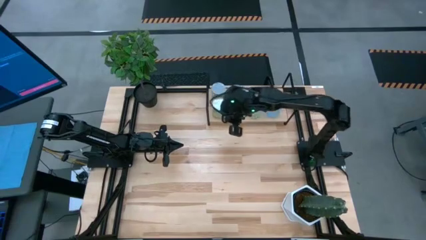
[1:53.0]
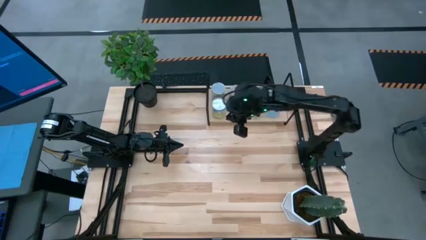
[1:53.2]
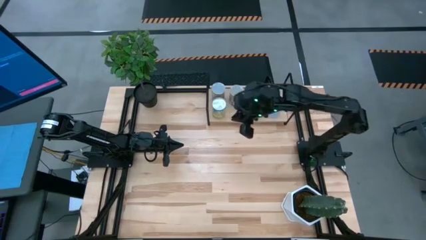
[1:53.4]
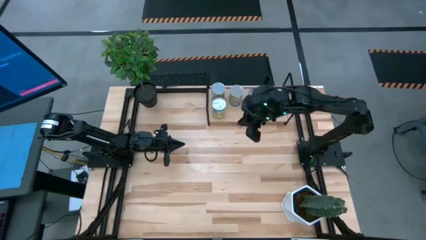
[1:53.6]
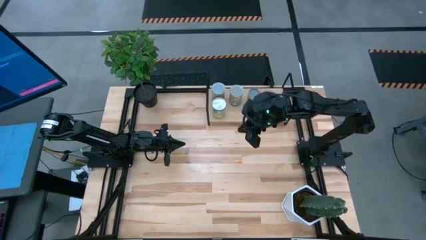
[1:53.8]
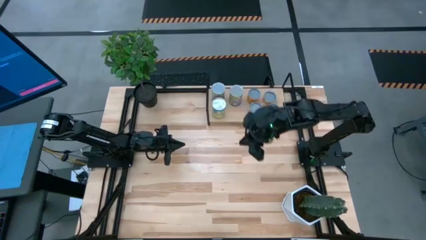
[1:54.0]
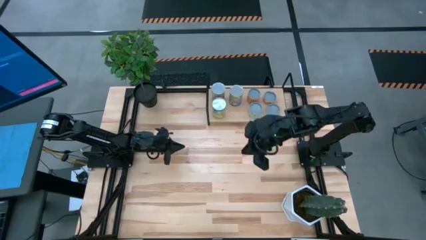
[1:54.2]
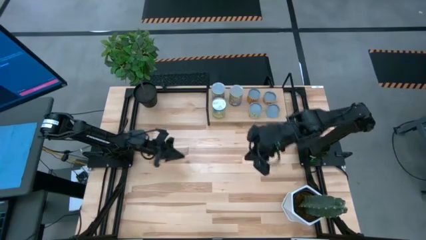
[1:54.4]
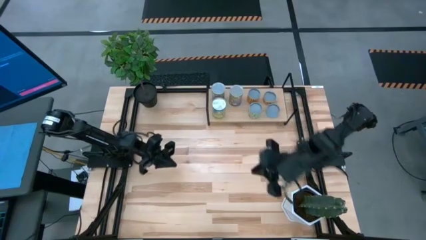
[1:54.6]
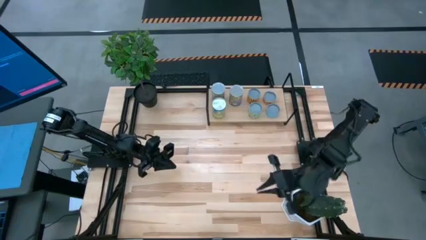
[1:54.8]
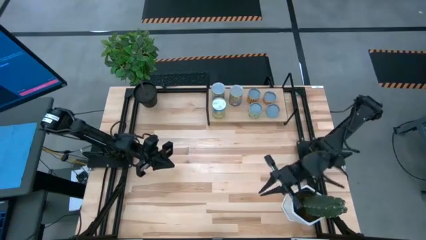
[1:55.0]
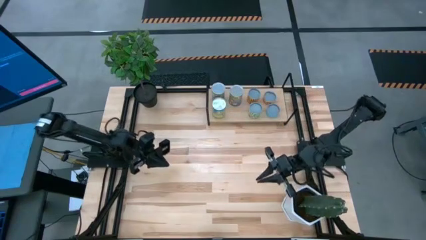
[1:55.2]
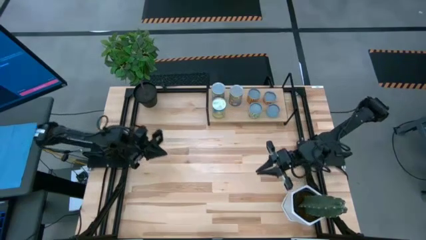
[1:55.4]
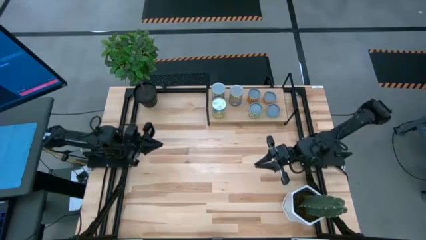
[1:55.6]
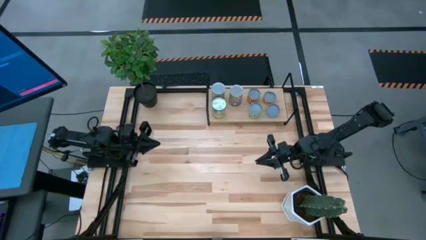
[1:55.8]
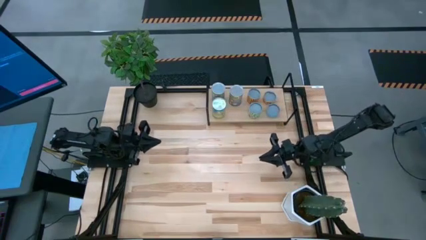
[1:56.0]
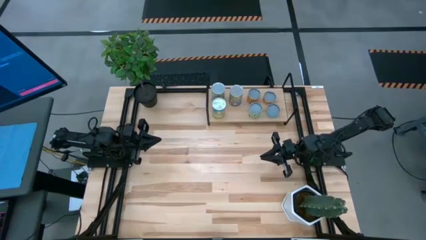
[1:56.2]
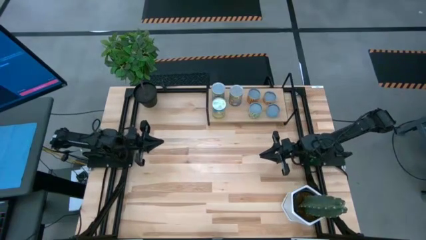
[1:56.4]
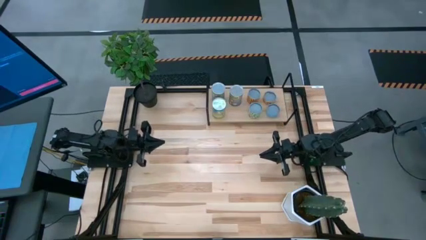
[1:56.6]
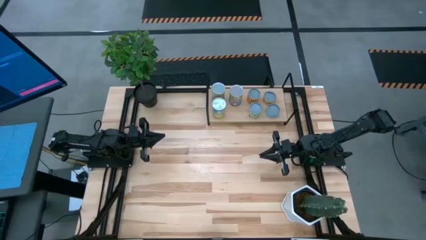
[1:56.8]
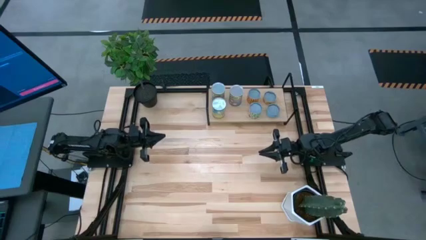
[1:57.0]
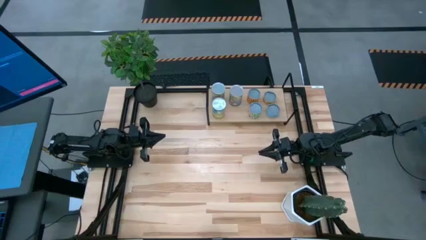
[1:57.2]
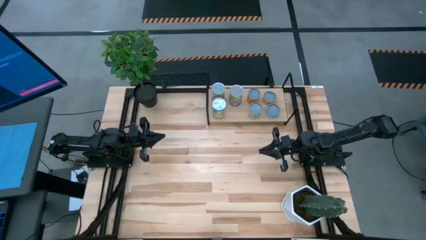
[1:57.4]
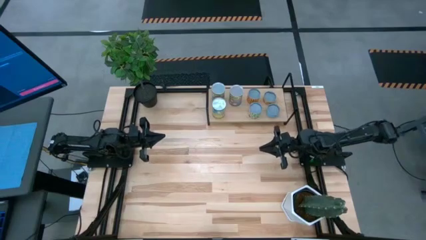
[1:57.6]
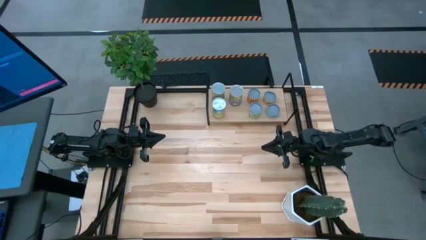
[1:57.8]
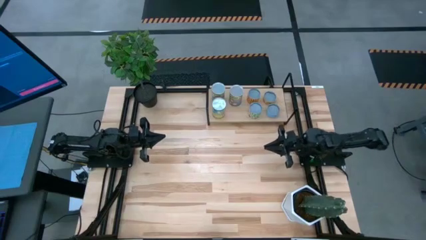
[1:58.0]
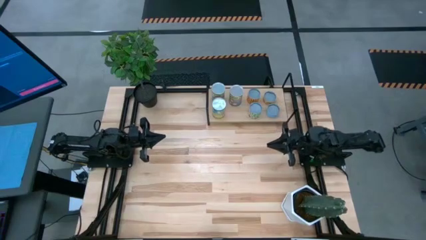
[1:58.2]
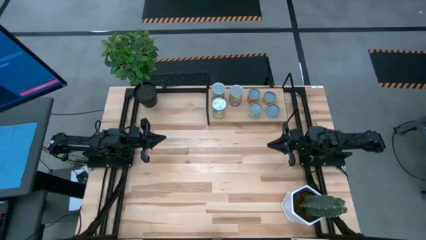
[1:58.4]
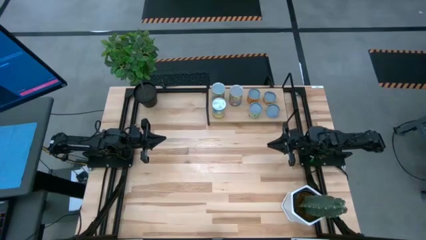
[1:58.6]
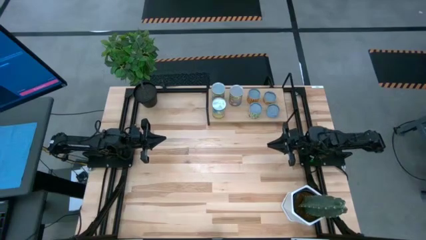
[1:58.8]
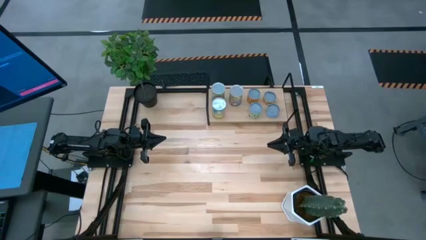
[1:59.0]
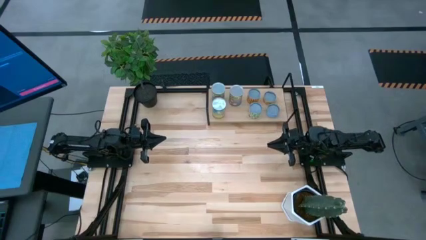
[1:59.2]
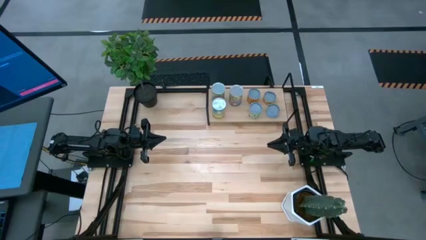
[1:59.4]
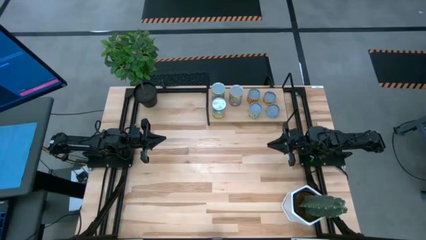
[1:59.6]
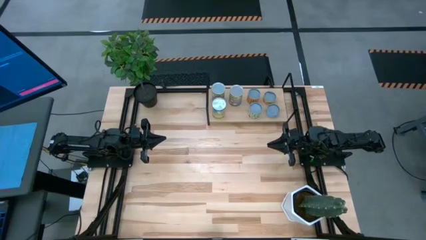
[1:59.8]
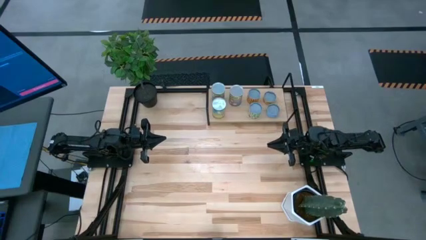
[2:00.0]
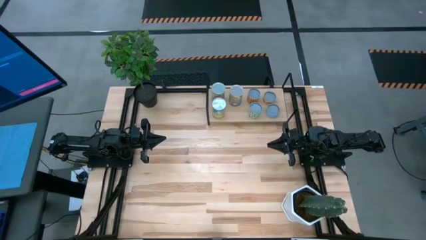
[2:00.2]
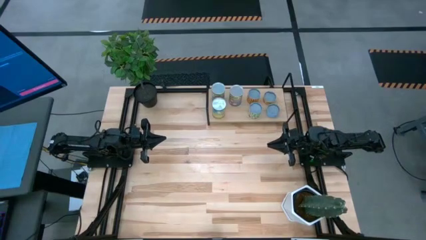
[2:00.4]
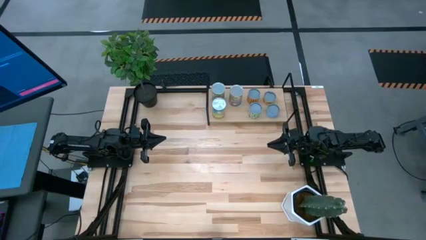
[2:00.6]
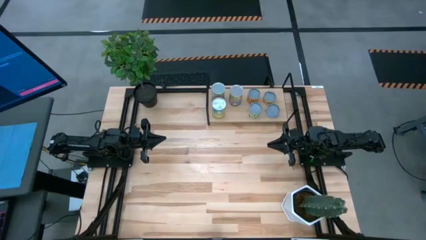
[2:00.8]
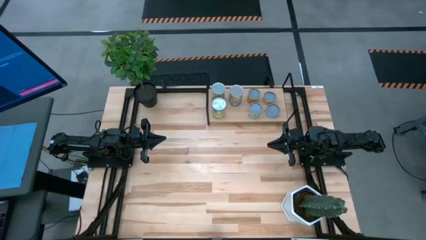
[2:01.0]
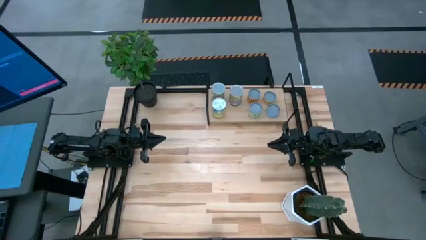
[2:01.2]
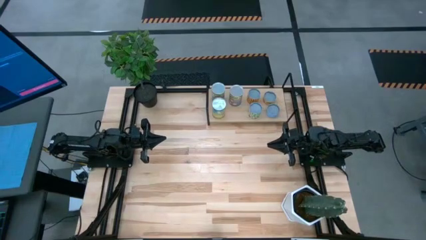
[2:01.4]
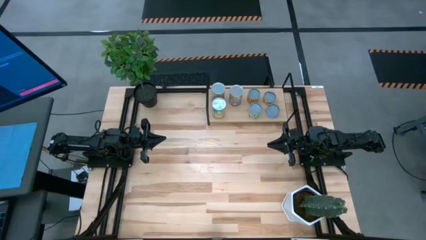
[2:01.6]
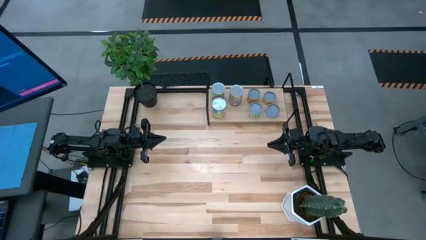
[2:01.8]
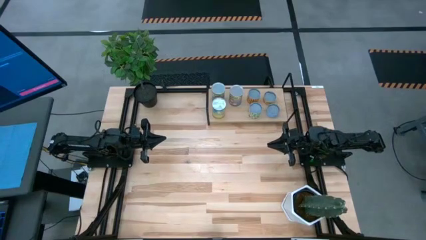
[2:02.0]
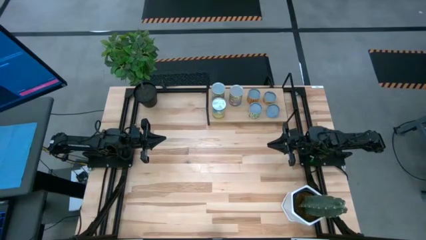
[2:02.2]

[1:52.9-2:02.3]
Task: Pick and place cans onto a shelf
Return to Home Position

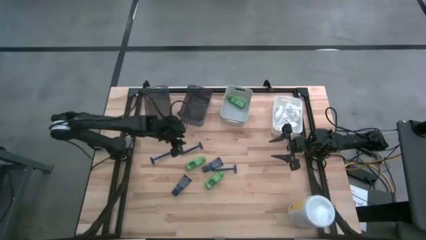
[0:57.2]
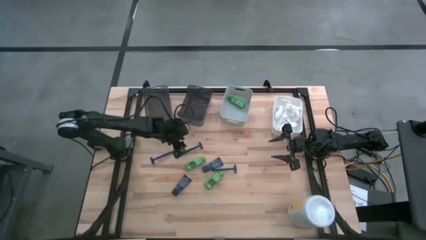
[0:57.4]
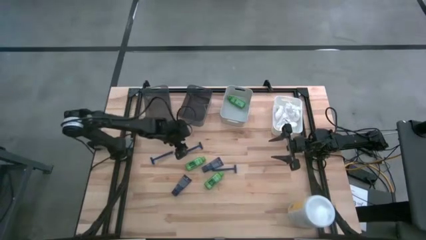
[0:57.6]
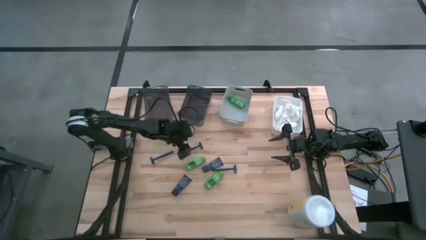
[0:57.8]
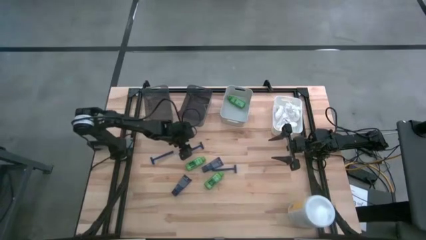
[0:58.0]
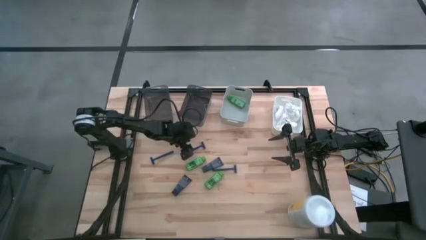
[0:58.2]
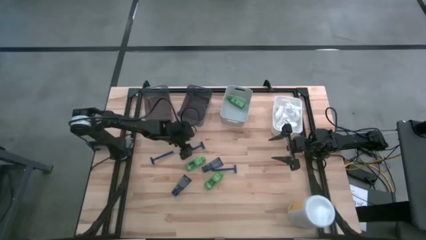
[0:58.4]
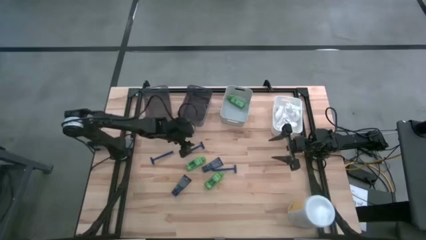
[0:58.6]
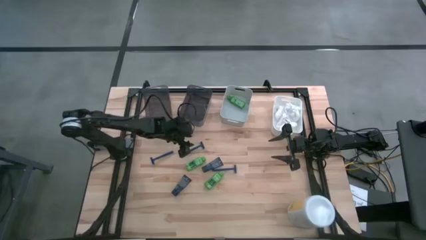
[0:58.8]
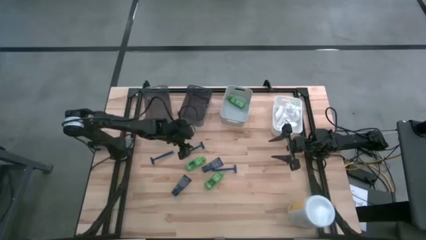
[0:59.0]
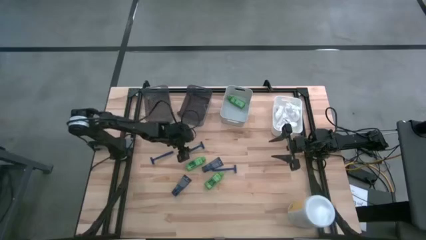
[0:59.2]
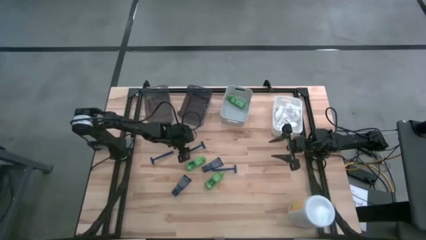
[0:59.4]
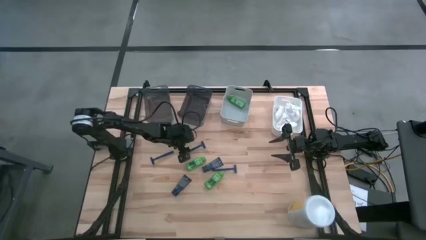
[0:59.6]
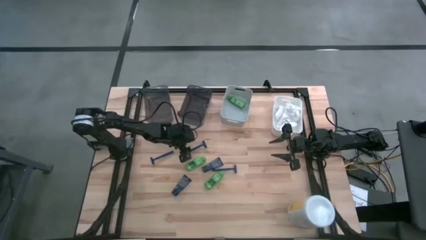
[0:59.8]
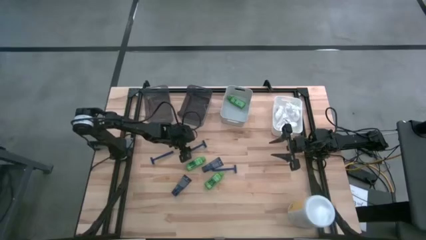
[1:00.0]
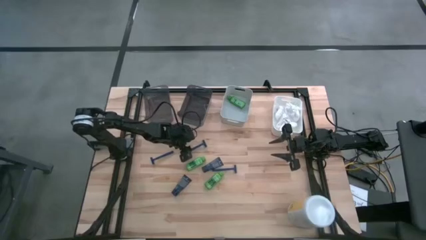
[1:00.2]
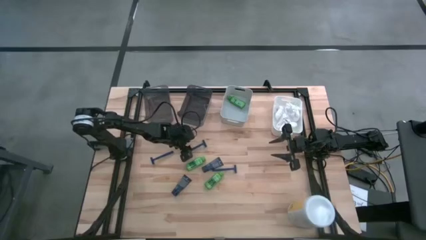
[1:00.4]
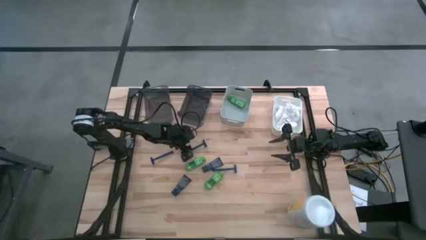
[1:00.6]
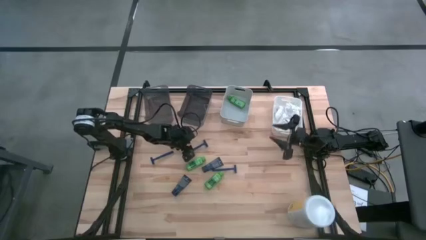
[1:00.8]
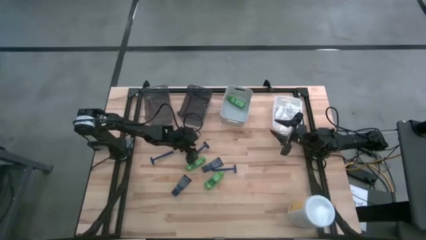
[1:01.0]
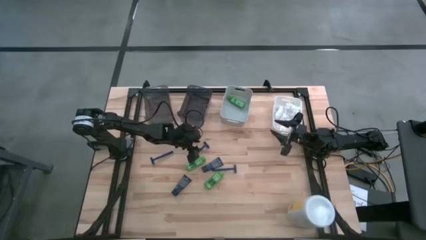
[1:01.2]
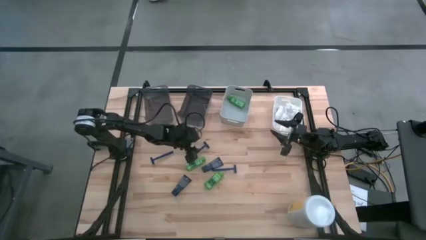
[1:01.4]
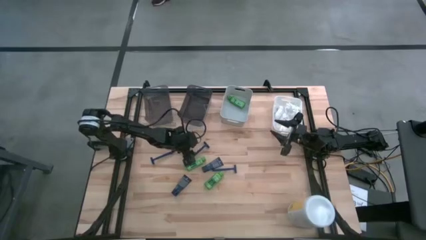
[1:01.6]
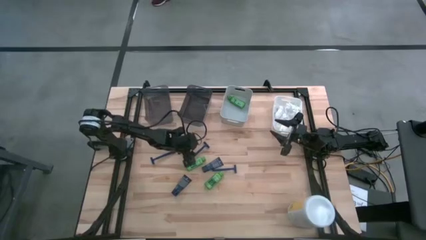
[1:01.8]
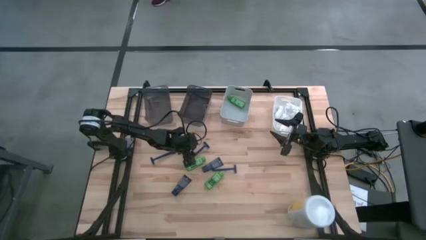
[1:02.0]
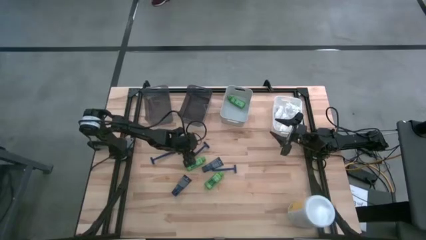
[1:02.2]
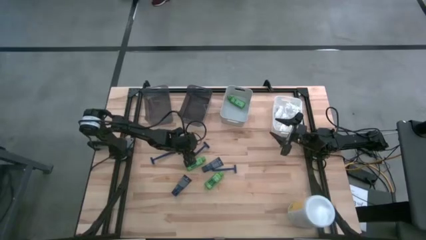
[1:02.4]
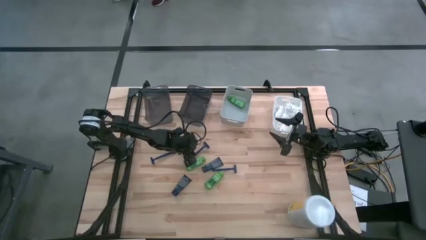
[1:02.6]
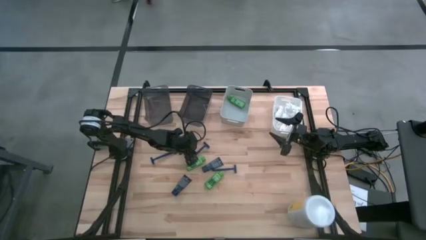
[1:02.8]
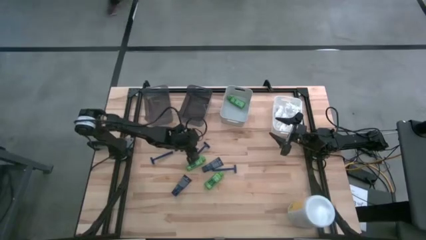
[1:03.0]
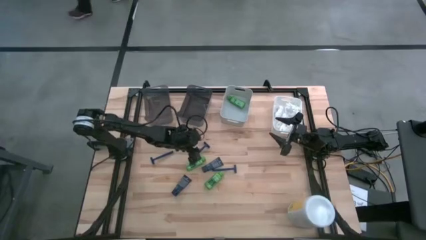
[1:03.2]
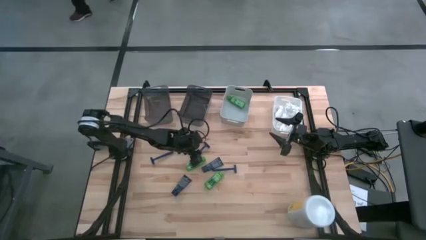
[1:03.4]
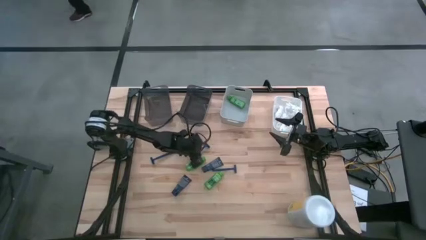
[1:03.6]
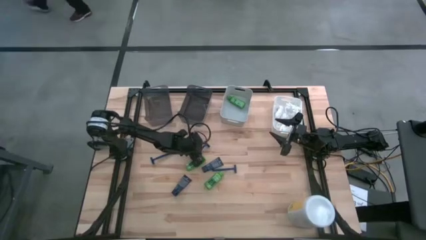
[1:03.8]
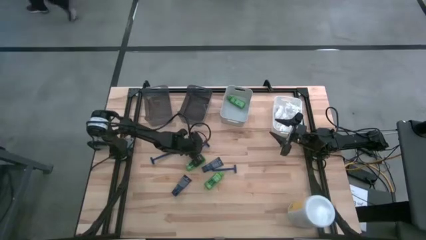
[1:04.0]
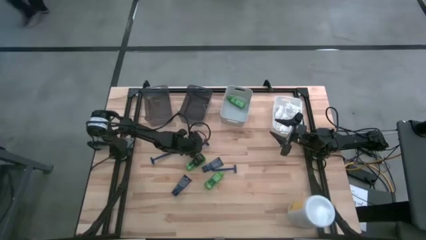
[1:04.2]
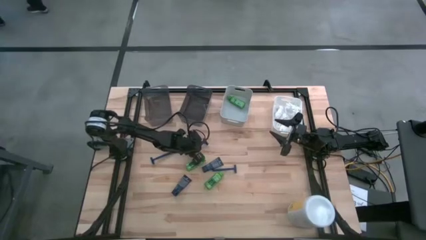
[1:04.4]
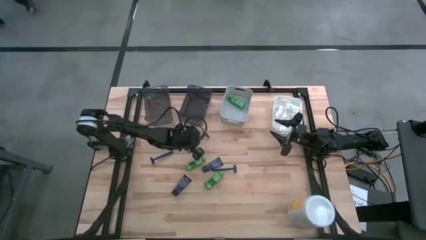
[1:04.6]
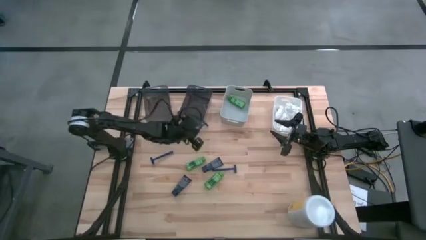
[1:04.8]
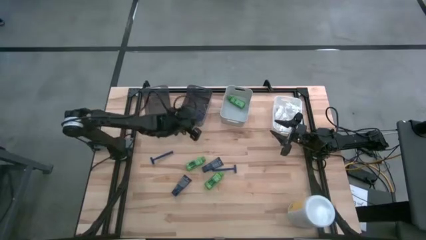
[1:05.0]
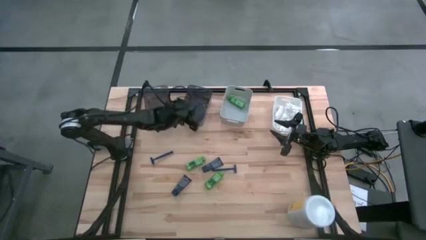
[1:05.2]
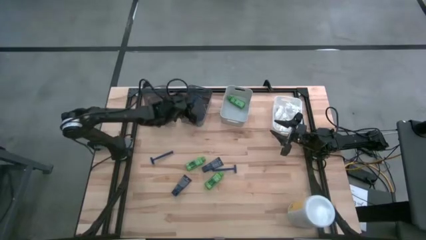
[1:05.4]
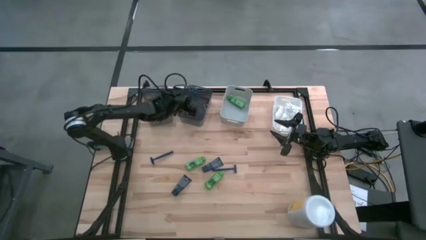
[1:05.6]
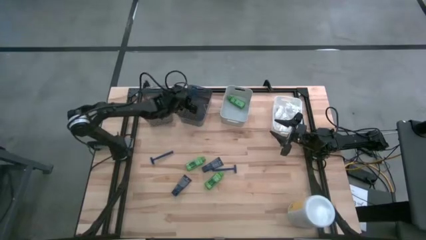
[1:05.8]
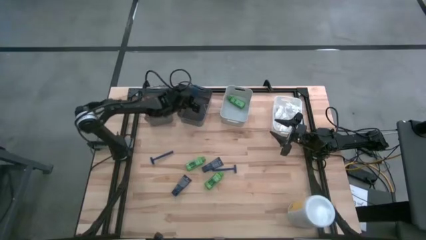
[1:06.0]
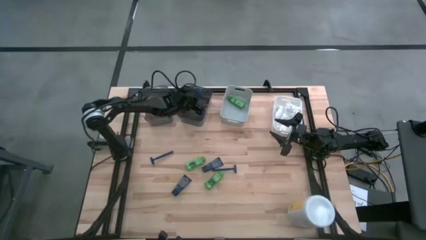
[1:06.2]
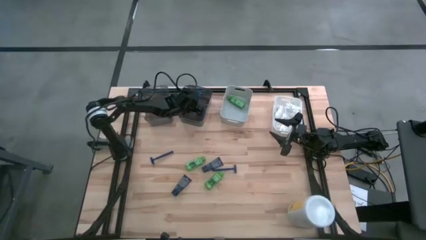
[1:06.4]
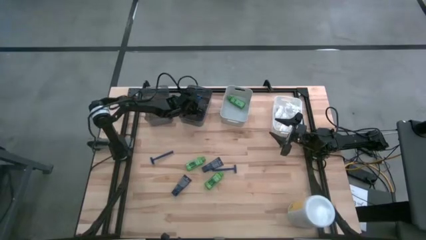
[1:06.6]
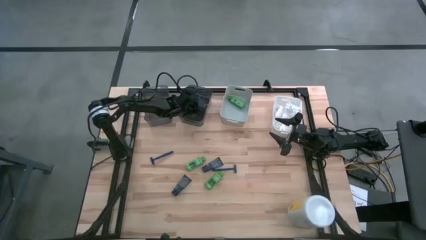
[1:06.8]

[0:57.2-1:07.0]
Task: Pick & Place Travel size toiletries
Put the blue razor into the right black bin
